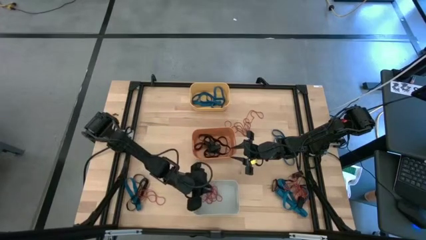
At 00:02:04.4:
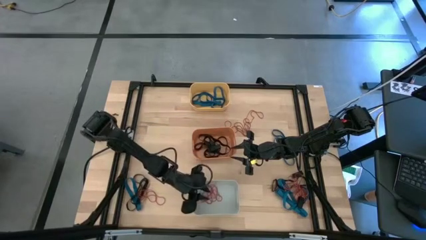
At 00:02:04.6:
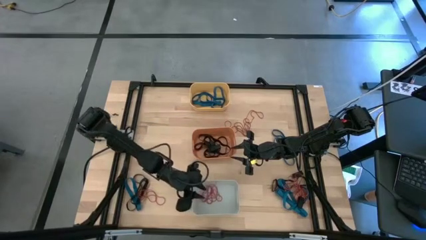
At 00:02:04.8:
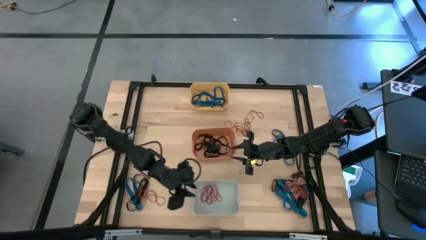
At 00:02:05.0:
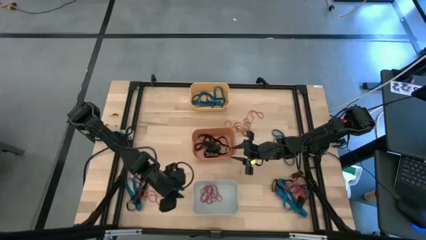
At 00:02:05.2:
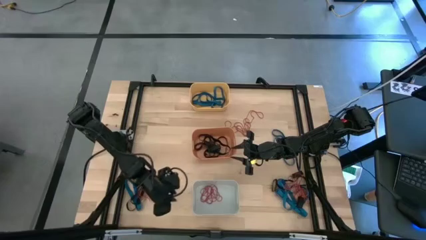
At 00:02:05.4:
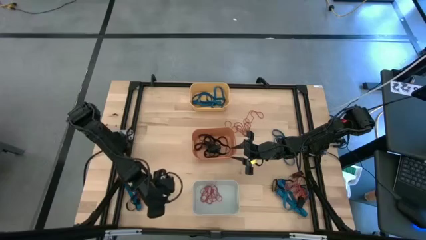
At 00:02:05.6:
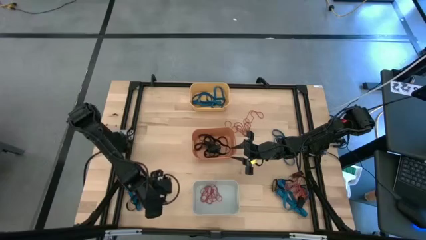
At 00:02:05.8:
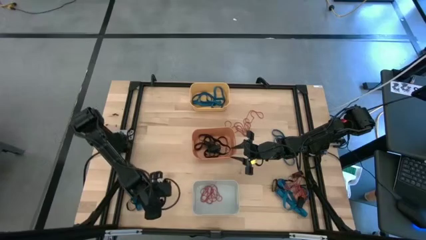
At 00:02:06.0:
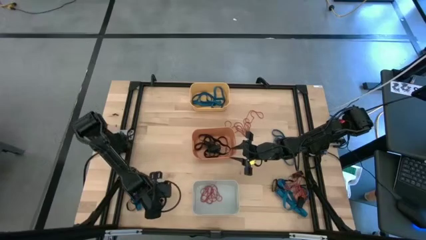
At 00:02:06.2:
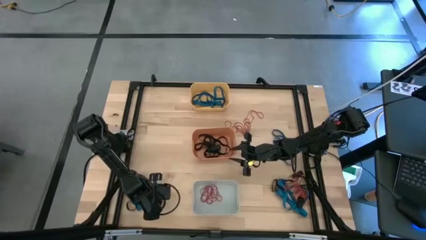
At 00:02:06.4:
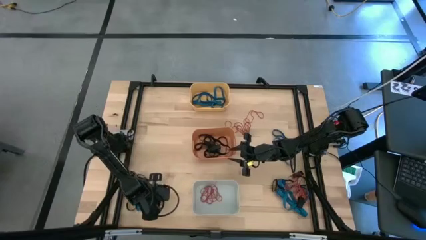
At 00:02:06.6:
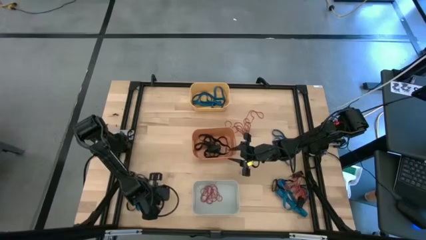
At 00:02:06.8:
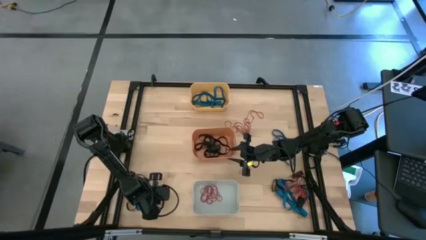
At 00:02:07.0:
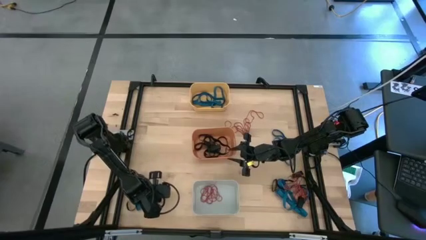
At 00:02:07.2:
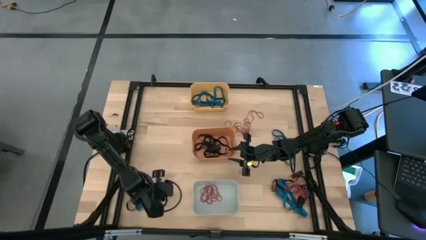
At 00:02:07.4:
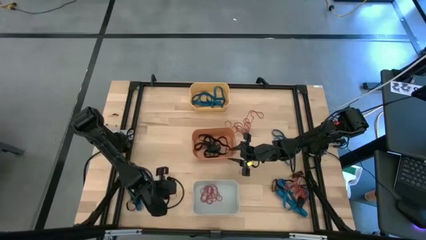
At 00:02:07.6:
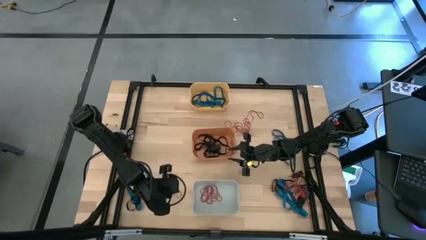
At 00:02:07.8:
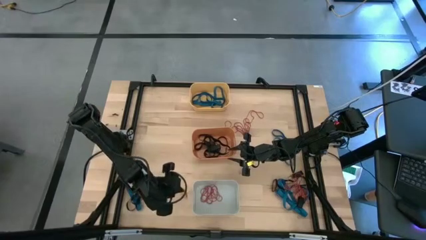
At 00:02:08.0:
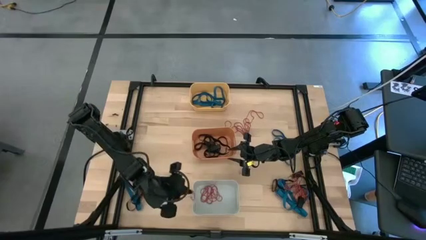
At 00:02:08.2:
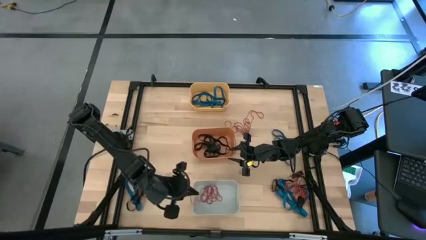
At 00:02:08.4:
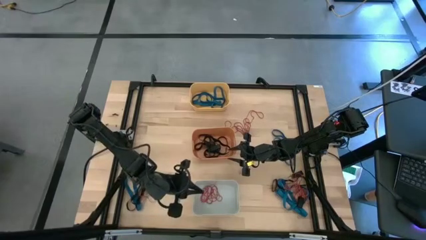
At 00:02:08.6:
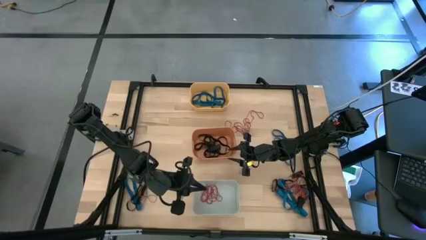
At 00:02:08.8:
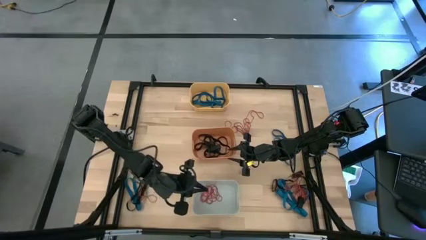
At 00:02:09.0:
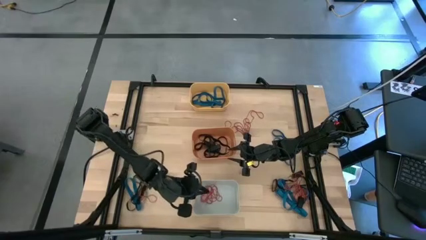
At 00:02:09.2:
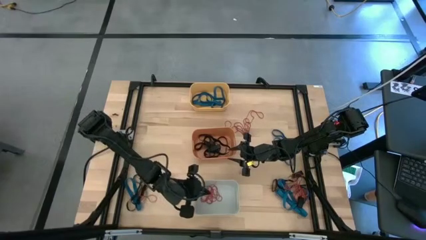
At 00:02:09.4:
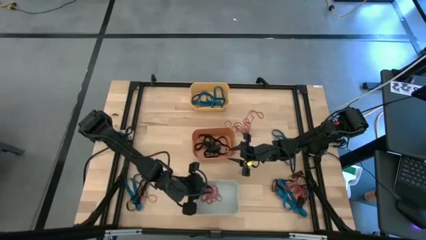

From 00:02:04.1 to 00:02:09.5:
Task: Sort rubber bands into baskets
Put the red rubber band in the white bin

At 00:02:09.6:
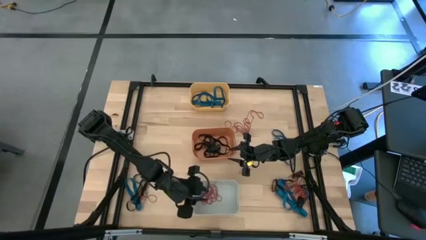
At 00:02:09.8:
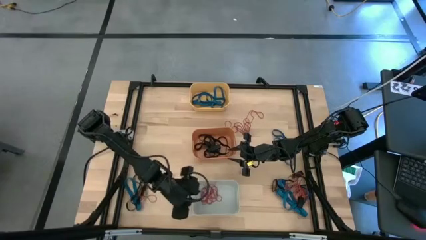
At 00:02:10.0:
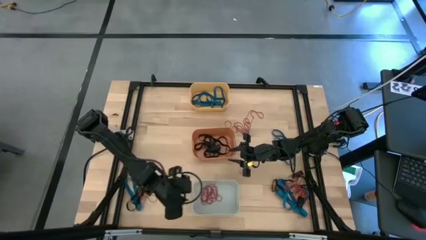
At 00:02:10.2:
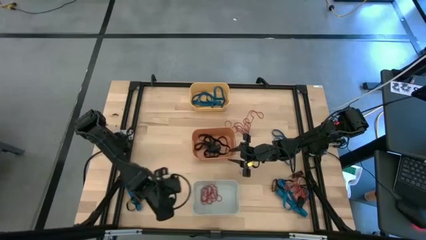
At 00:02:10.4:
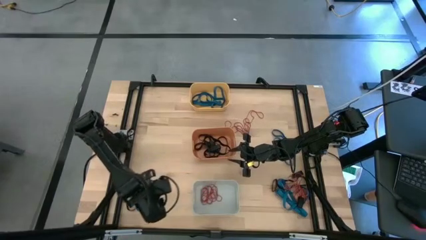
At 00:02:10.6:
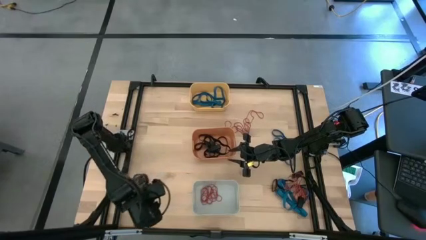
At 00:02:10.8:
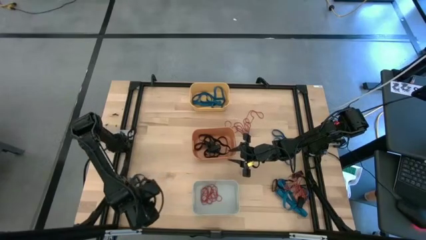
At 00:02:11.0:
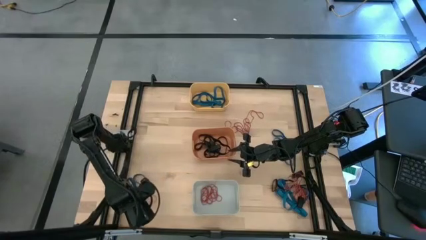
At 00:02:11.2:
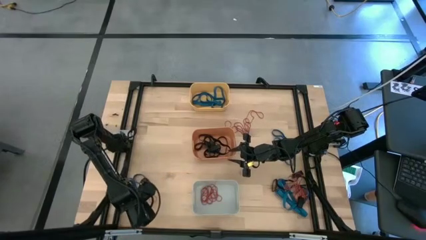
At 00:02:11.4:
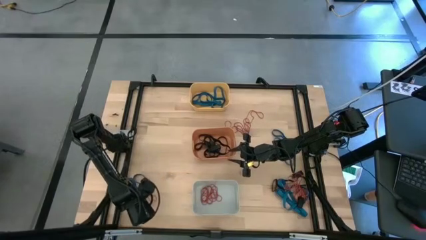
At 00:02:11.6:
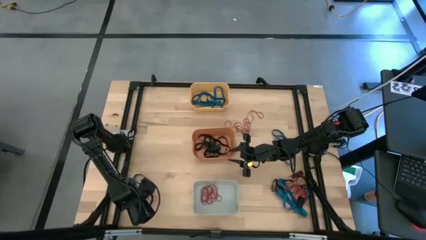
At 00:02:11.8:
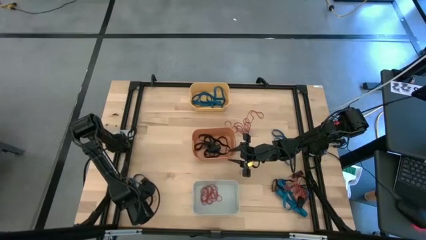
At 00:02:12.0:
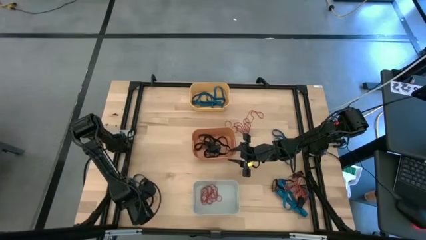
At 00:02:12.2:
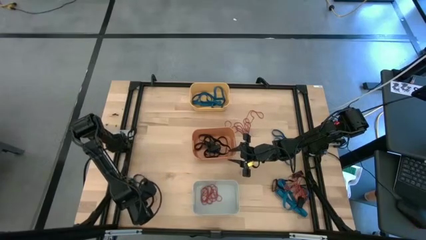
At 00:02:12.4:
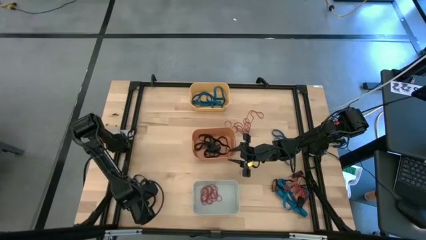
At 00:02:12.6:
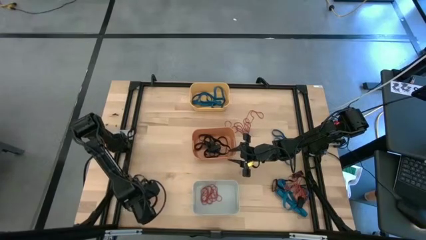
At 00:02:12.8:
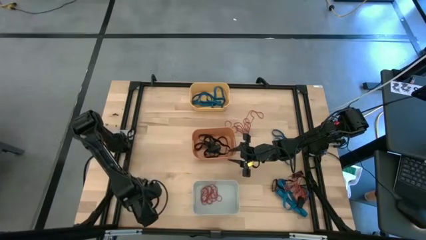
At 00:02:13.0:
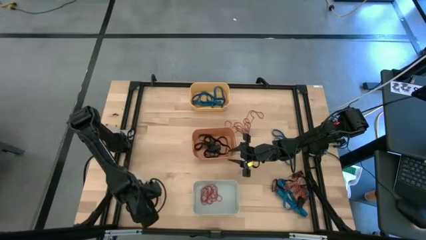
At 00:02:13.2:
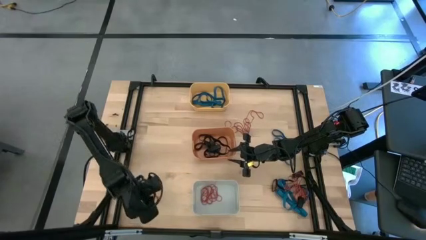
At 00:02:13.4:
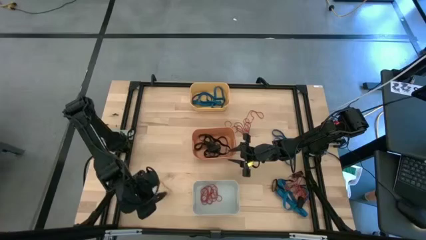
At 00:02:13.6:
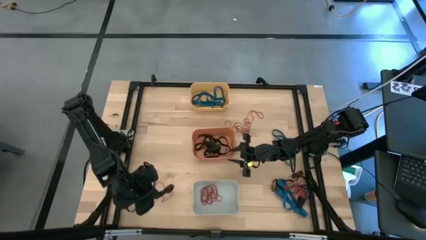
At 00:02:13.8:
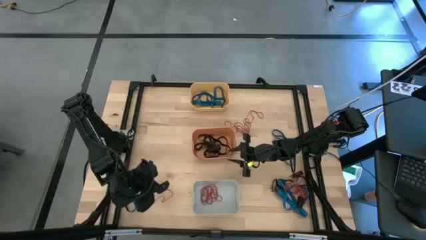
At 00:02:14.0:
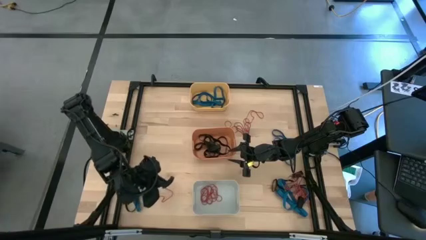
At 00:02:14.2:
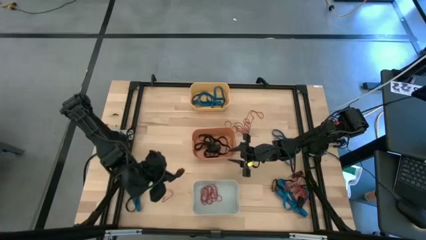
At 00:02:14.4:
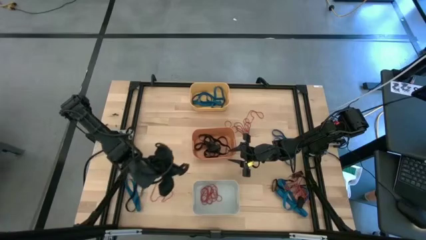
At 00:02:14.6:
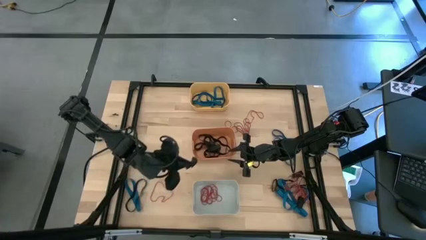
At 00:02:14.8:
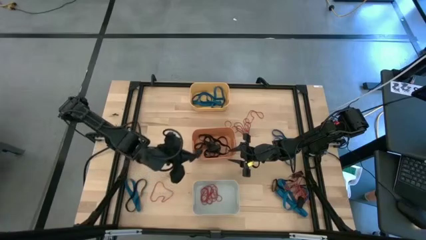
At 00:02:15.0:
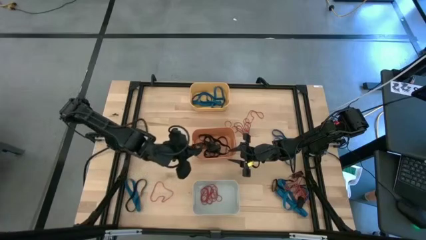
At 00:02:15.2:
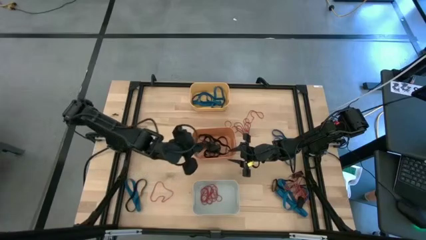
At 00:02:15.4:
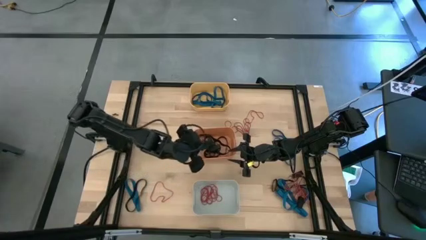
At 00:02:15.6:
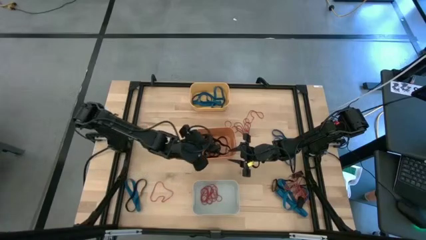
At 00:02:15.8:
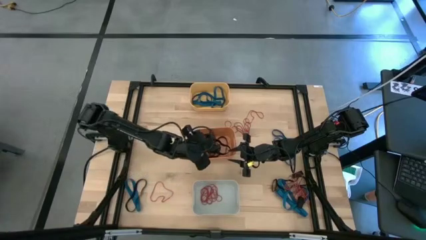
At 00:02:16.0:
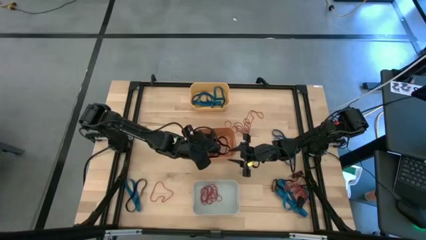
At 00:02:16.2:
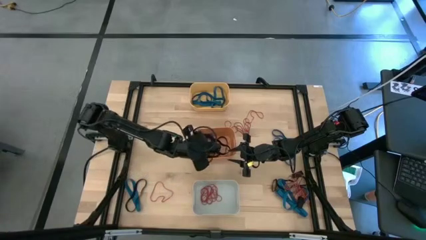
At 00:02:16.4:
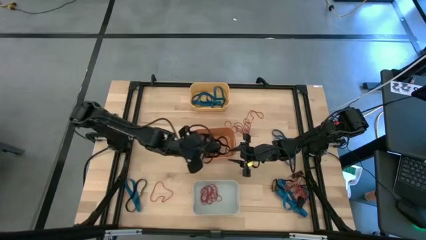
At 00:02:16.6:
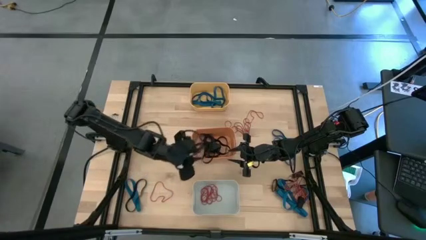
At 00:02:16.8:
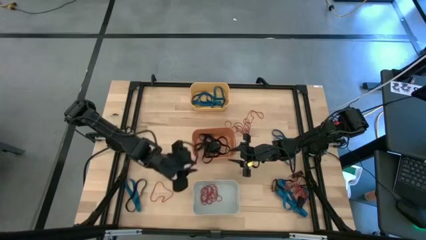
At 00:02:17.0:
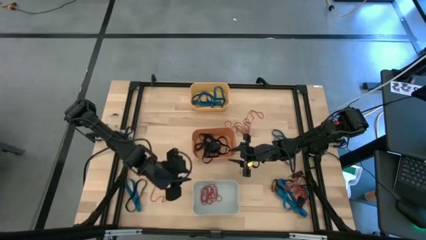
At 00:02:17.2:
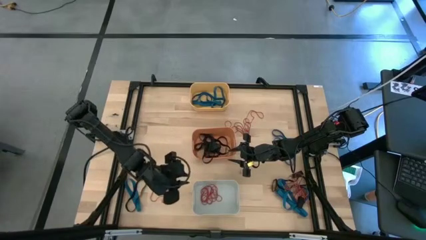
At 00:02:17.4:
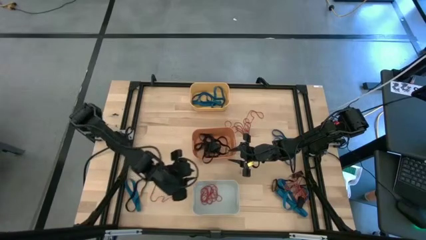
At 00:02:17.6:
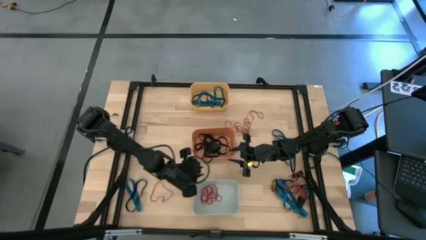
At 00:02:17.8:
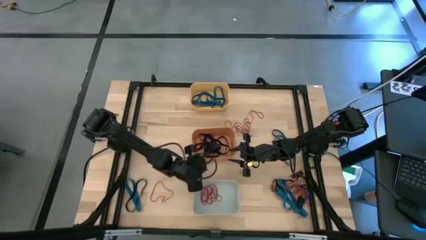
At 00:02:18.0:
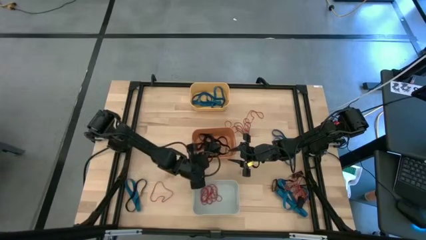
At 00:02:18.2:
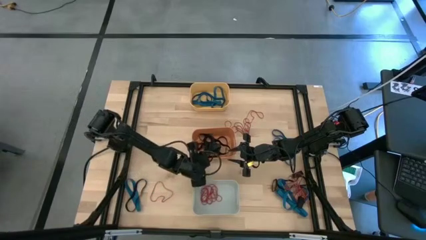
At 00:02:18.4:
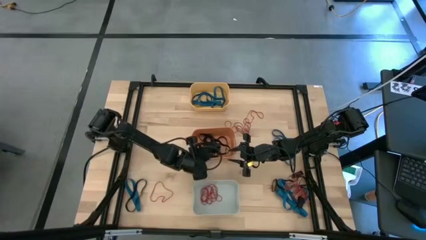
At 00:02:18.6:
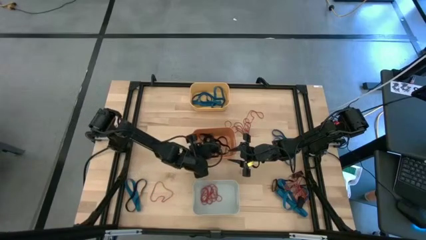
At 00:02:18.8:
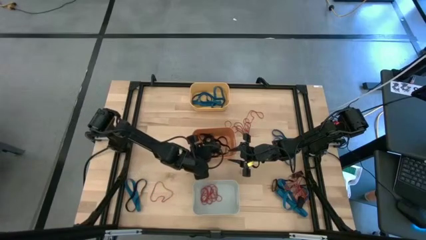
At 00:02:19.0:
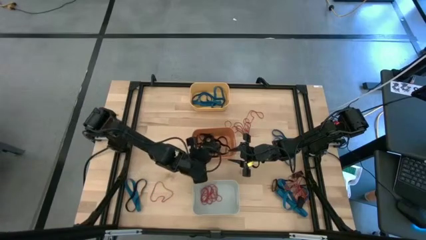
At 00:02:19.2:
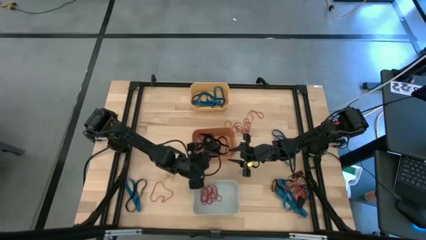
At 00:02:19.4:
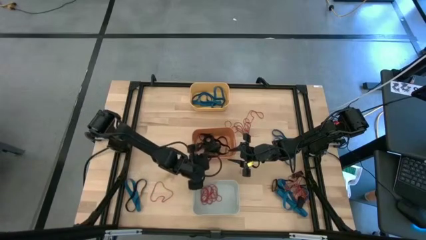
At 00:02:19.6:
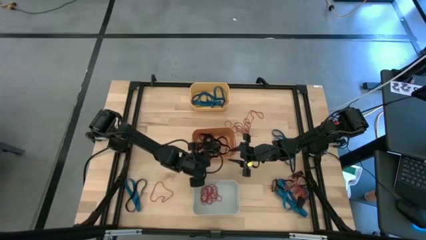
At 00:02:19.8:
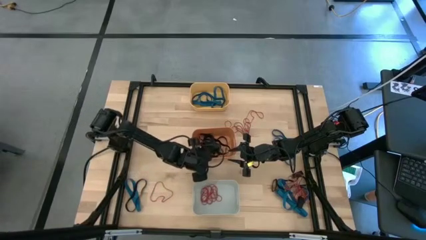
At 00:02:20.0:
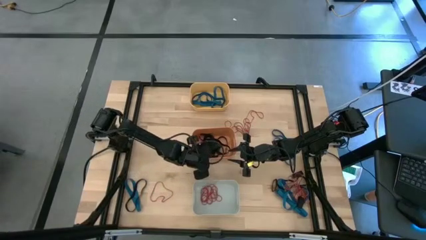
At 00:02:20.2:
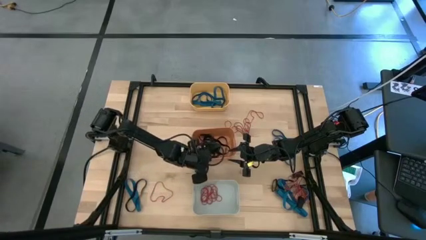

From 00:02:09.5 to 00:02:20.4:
Put the black rubber band in the orange bin
